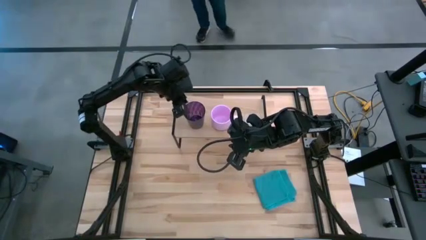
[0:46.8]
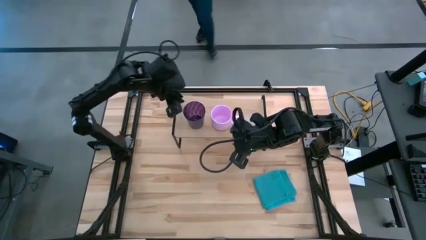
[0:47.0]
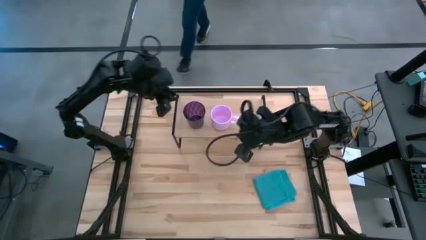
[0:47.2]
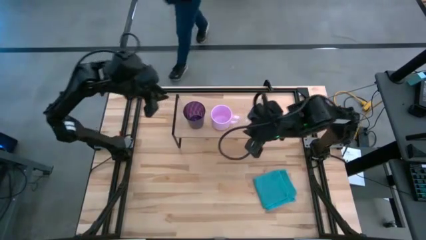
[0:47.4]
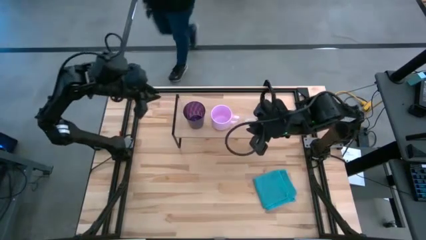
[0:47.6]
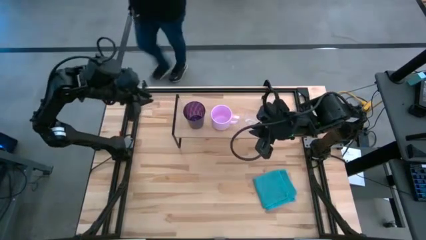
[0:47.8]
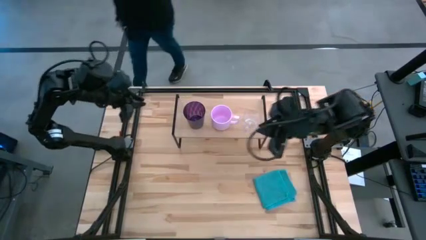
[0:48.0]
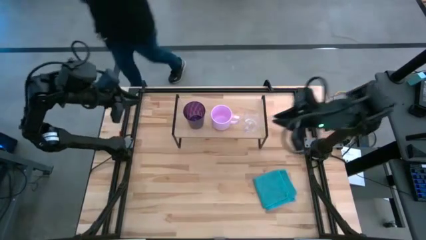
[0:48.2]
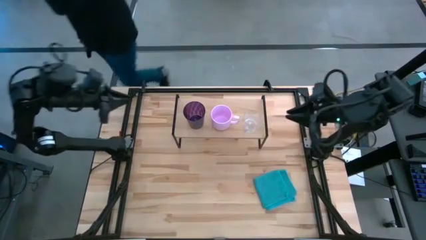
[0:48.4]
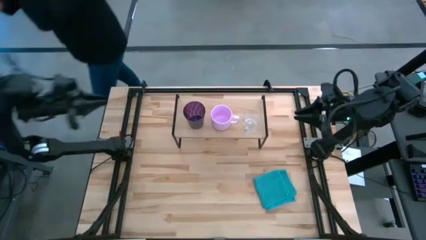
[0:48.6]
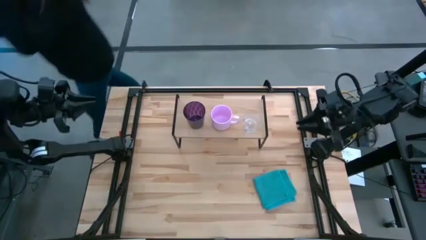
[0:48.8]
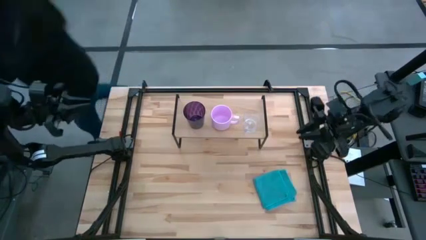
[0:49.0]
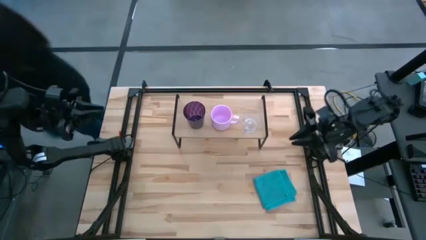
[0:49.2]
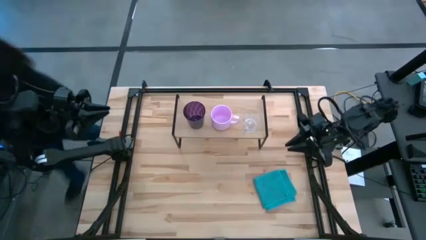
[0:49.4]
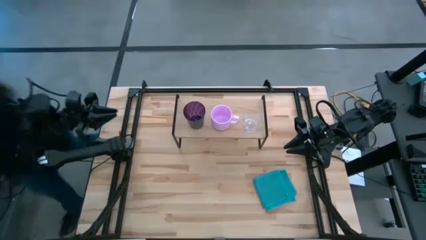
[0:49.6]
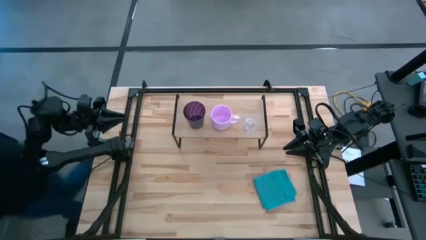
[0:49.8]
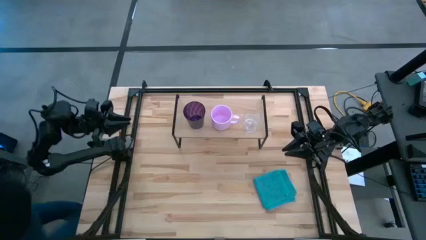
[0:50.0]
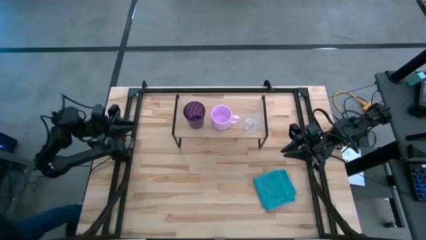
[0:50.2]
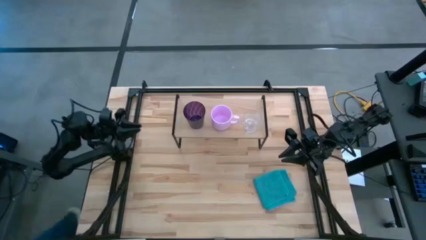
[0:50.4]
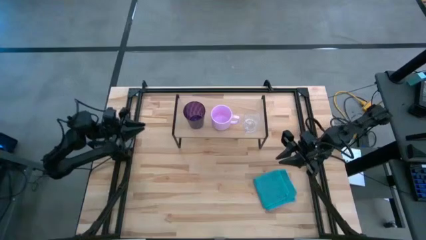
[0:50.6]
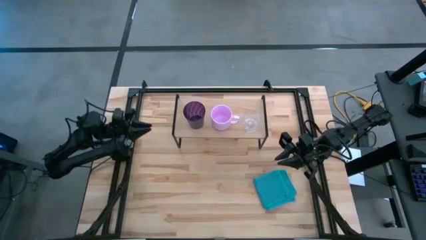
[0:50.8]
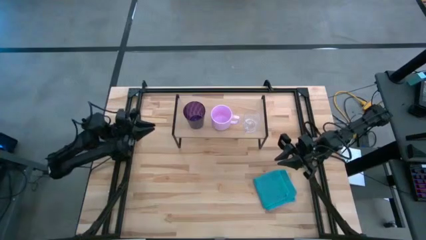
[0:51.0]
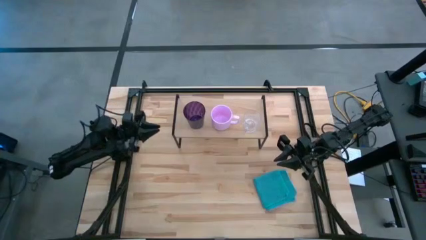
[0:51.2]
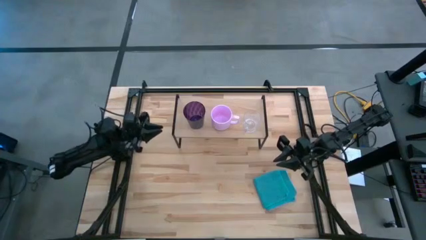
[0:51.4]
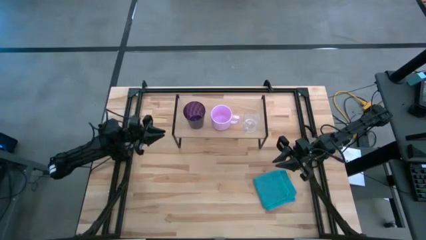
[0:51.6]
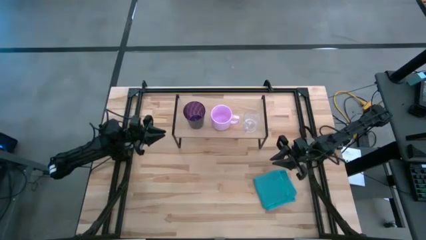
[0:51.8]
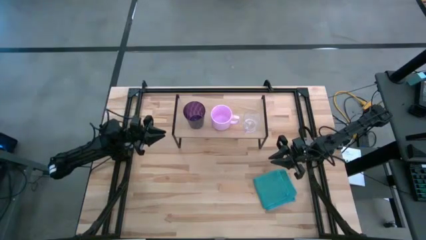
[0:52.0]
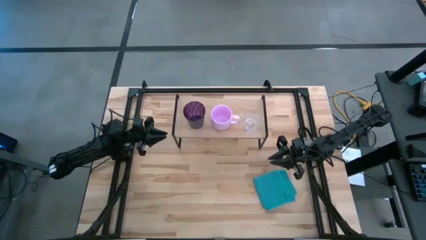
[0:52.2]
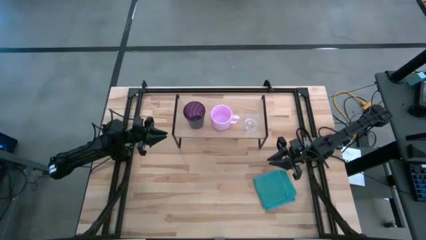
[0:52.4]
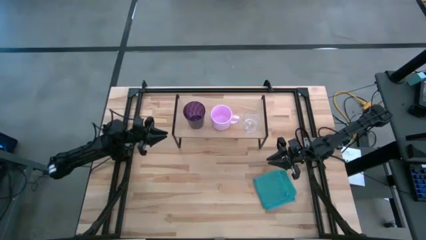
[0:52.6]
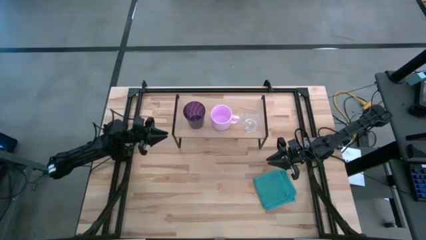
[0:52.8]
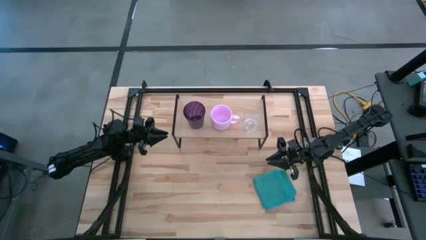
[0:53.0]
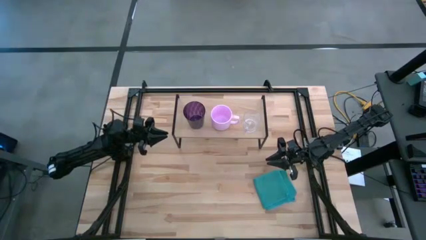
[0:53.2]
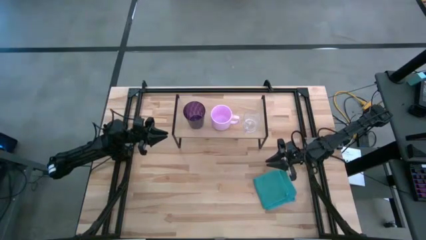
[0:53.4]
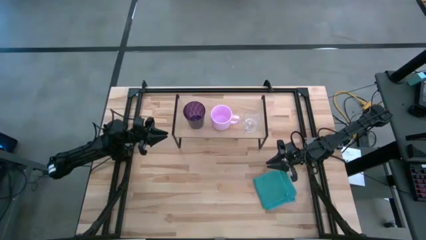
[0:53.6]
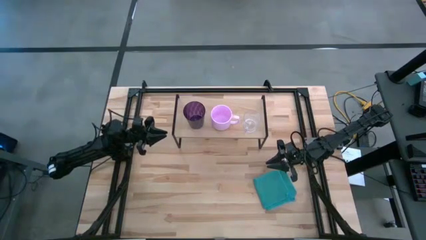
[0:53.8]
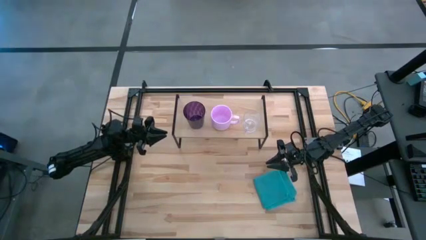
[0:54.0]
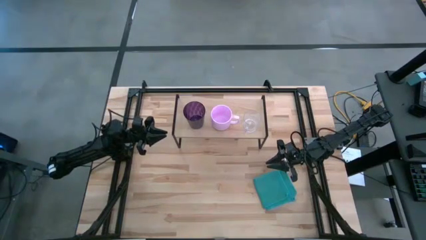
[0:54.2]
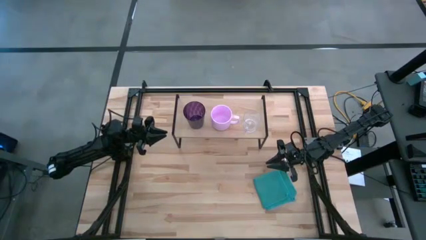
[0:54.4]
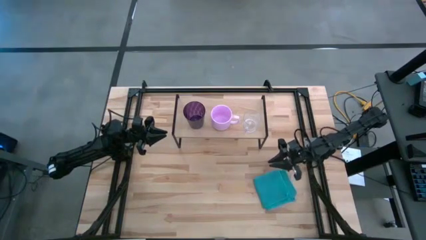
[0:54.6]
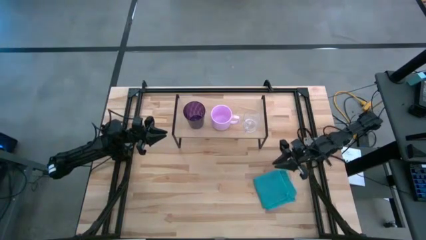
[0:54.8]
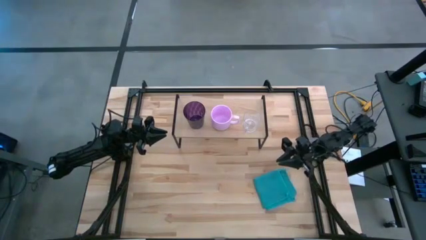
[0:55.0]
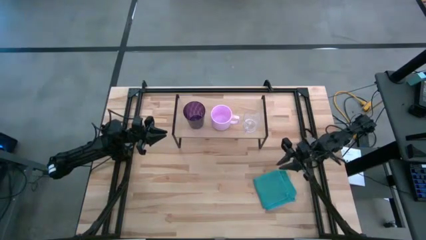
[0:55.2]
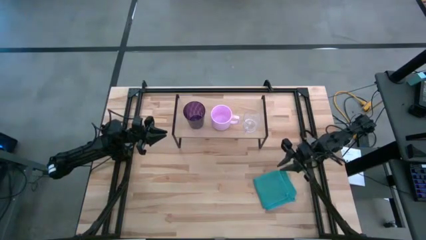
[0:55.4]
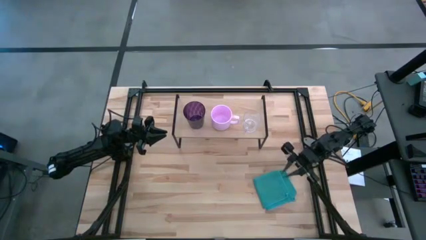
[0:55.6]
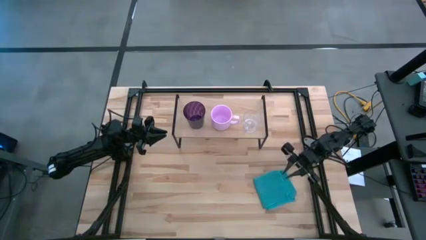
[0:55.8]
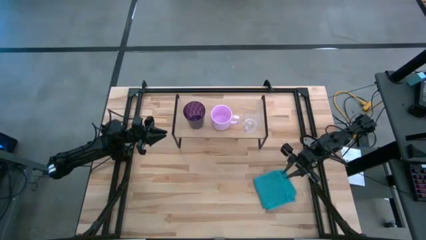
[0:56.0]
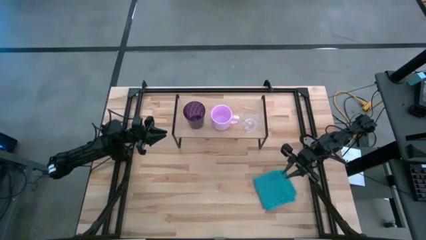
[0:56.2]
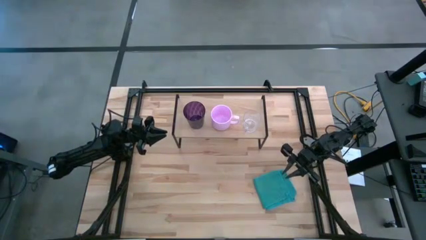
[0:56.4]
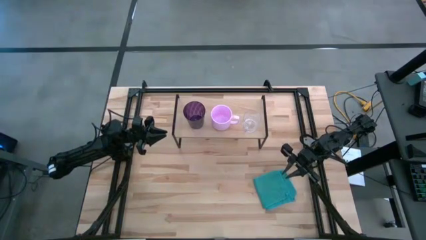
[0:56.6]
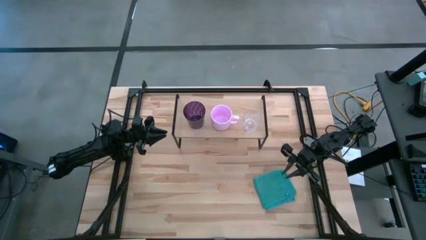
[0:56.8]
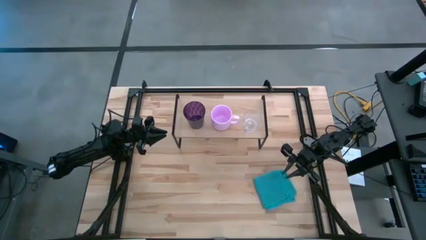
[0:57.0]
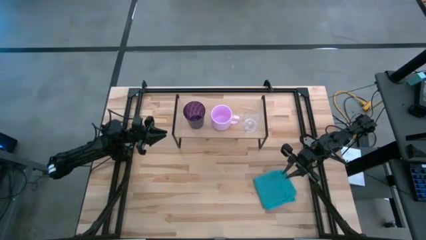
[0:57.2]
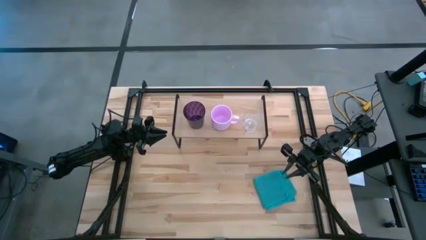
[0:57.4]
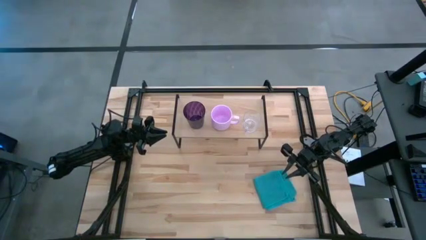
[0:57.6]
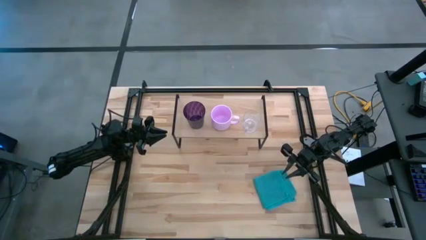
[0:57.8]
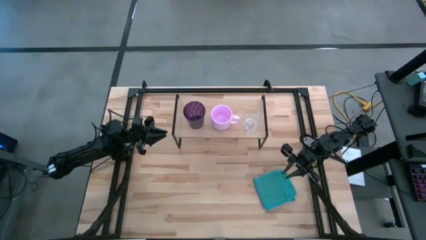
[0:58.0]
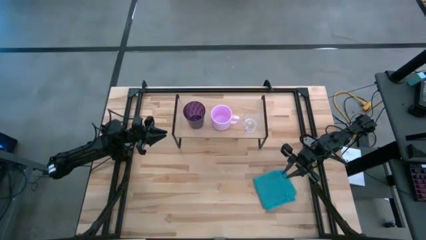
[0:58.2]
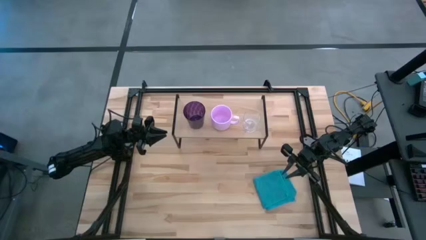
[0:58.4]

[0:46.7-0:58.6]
Task: Stack small to large cups/mugs on shelf
Return to Home Position
